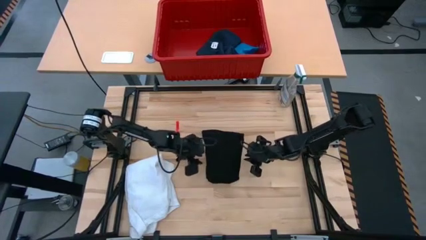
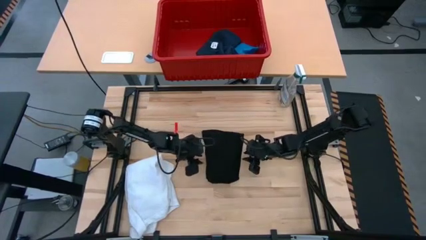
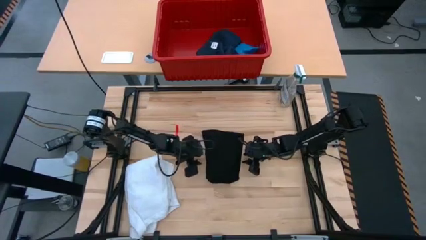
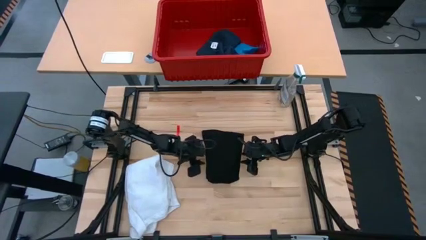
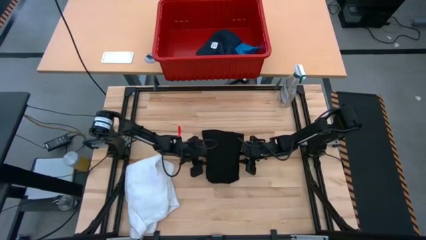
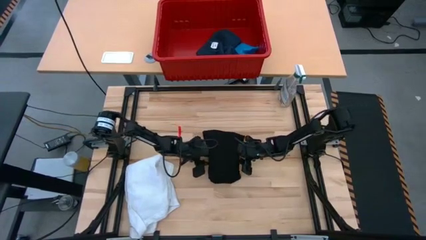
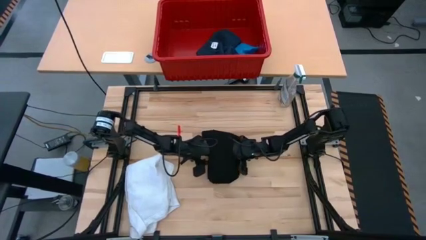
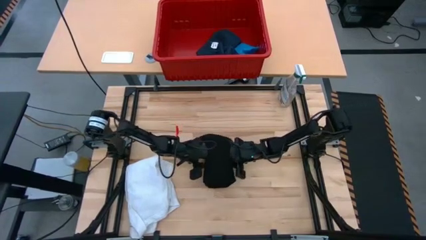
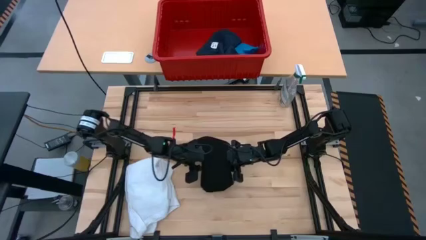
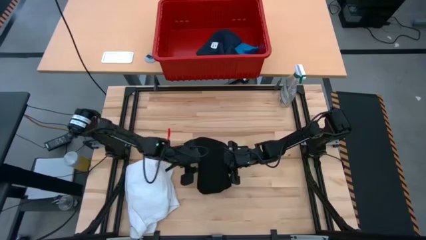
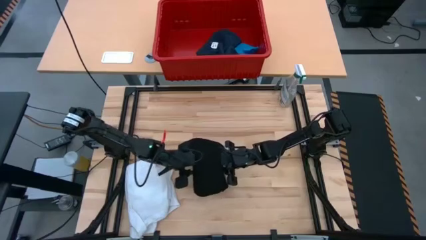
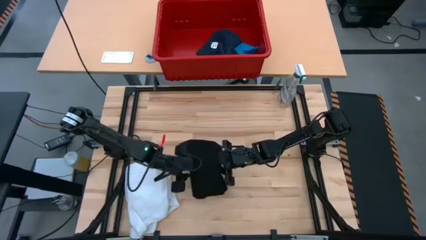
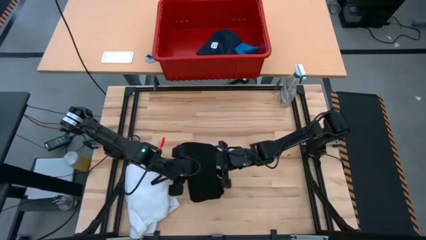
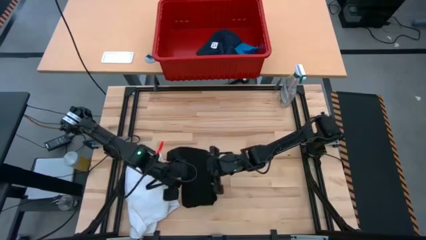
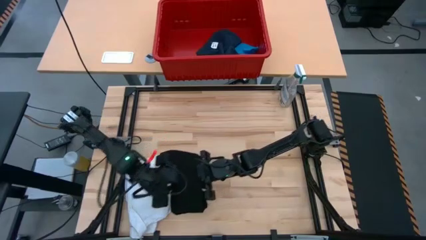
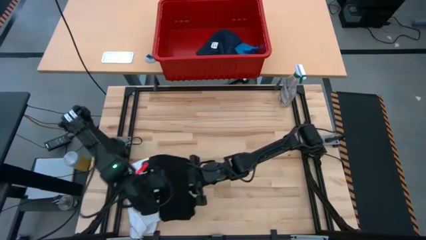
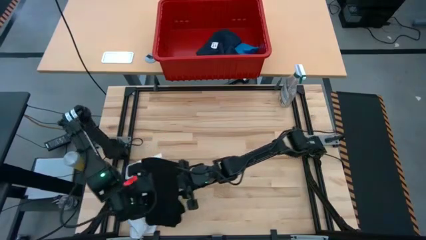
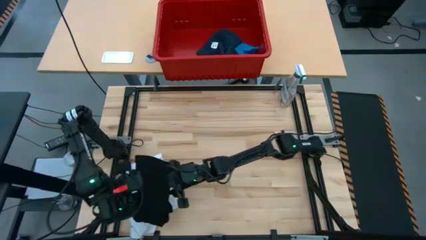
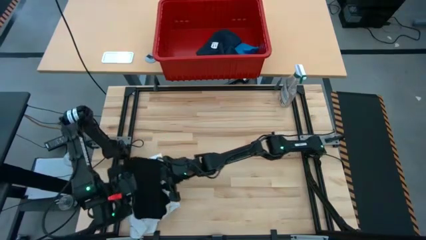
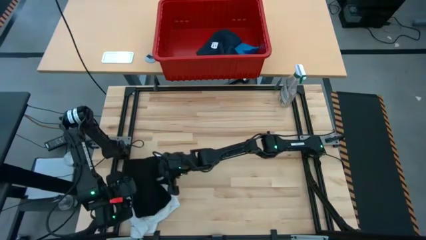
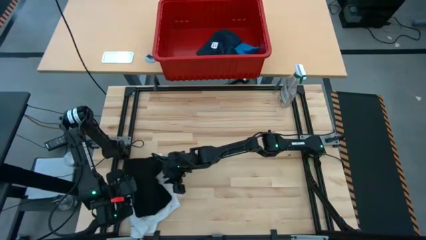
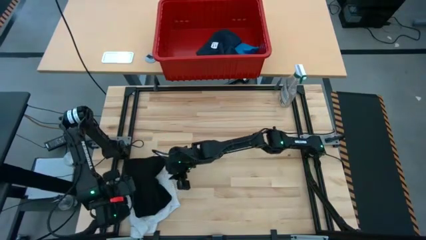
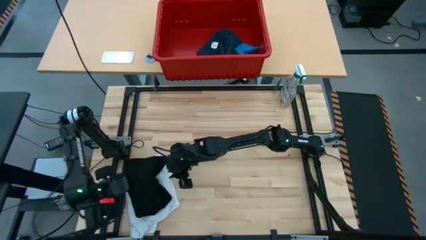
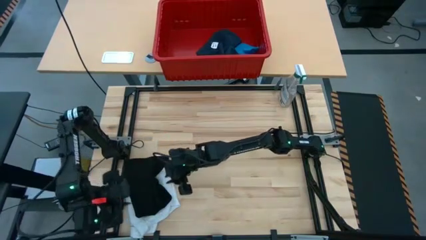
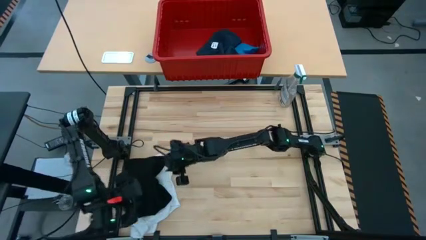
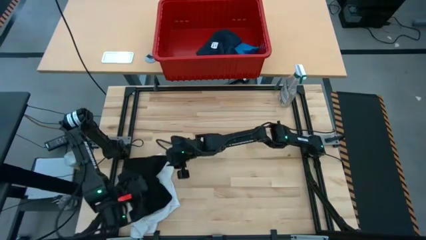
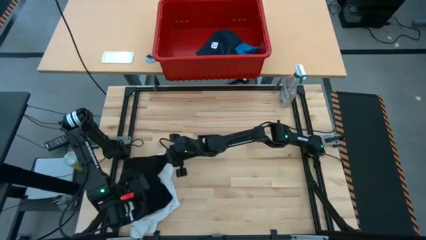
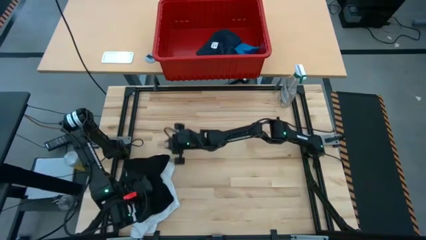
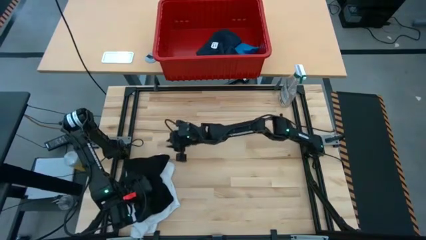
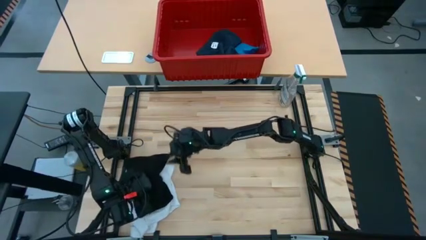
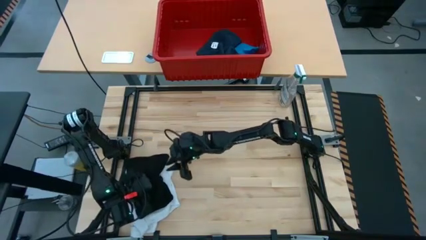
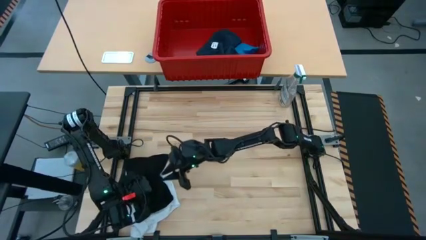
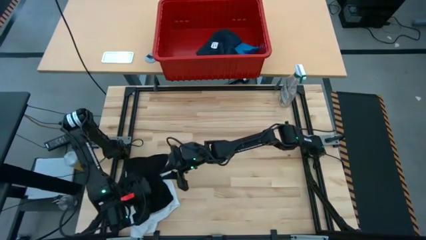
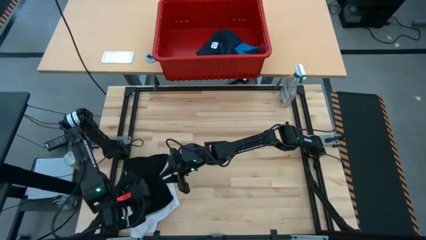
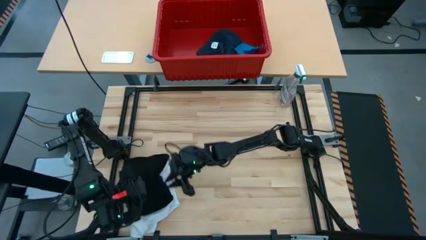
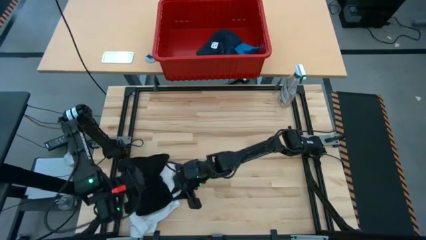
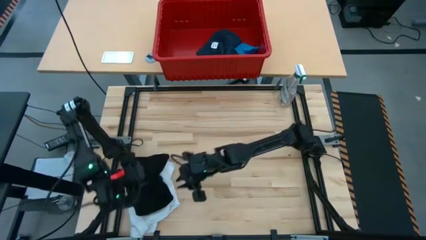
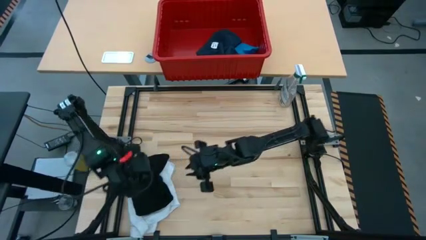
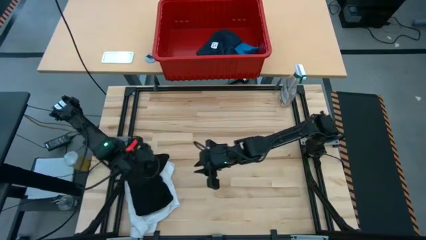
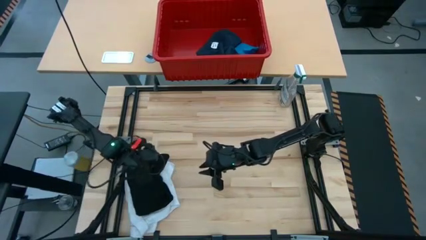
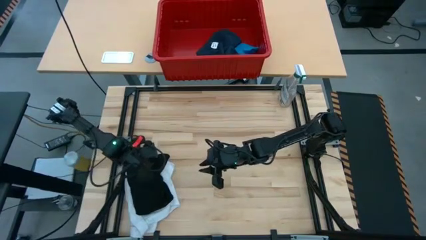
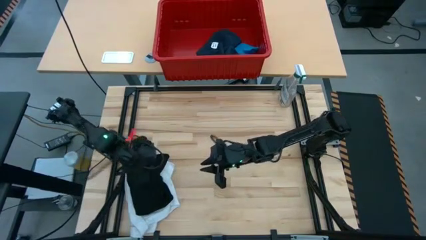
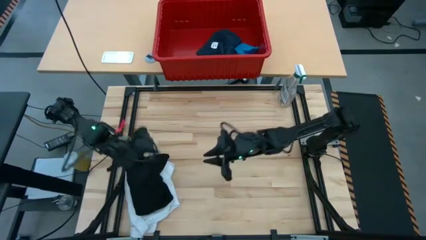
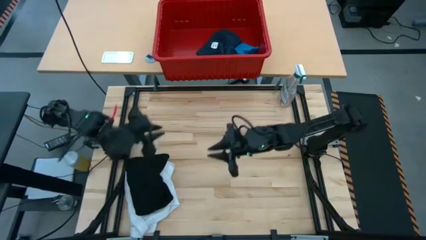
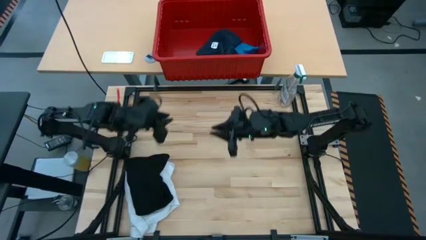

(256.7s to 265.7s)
Task: Fold Laundry from Bin
Stack the folded black shirt on top of the folded white polo shirt

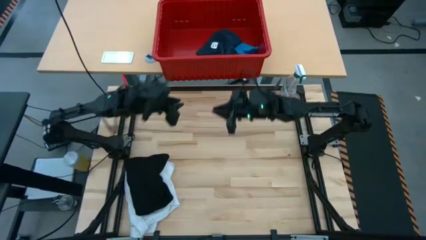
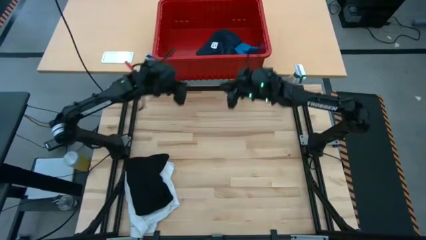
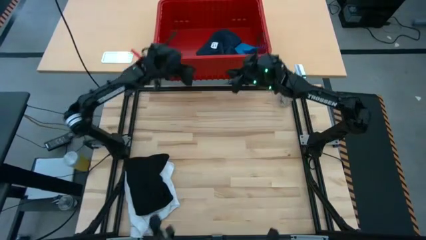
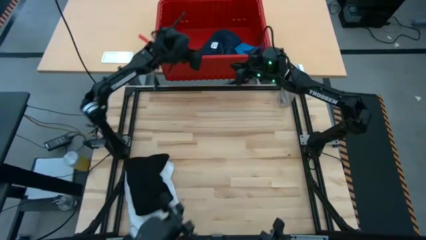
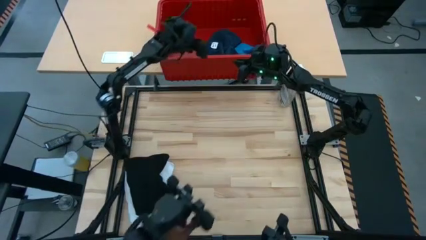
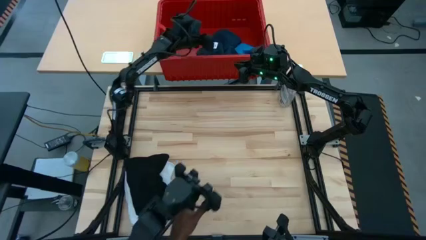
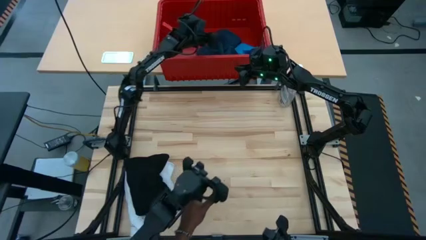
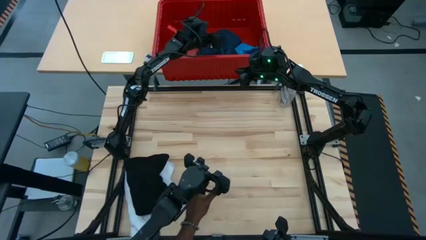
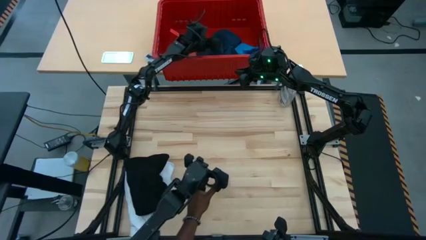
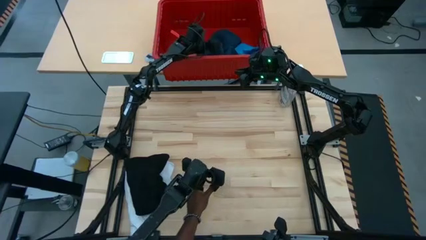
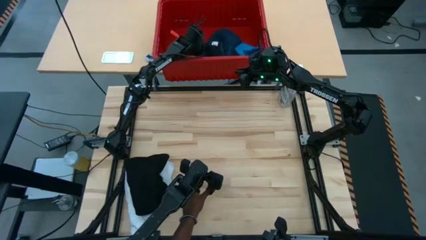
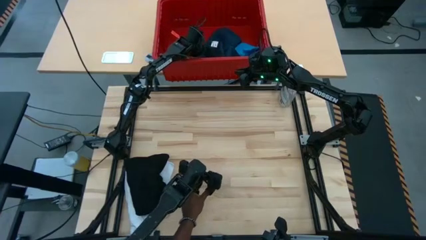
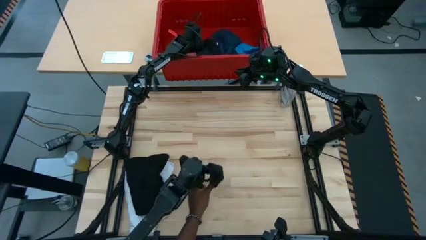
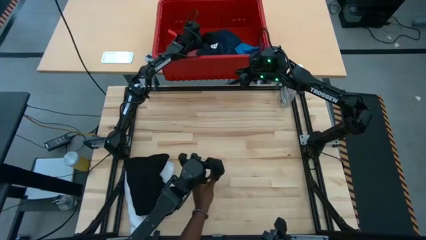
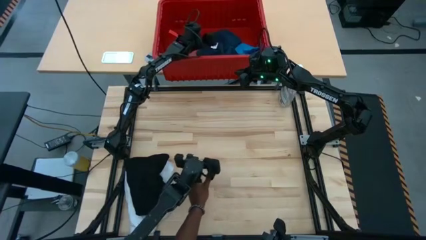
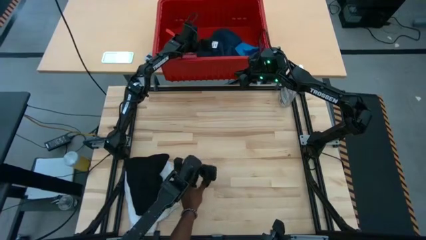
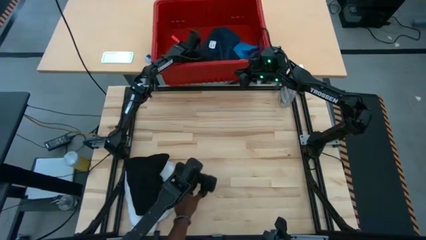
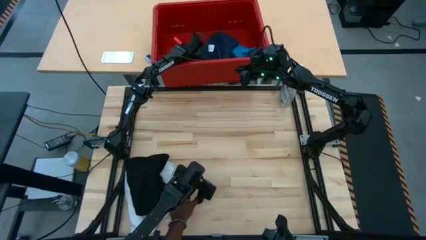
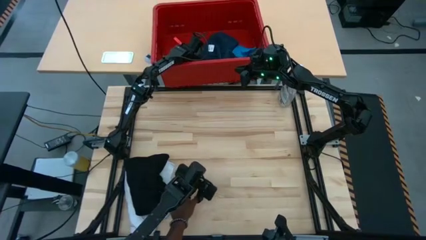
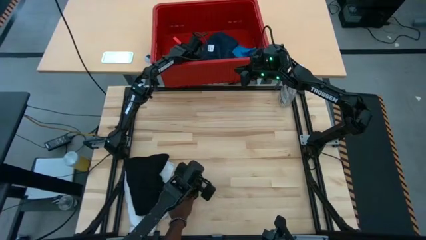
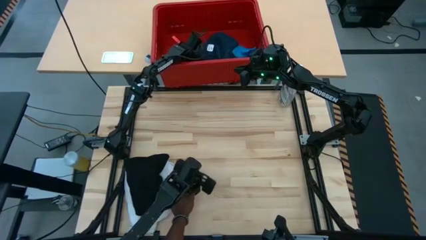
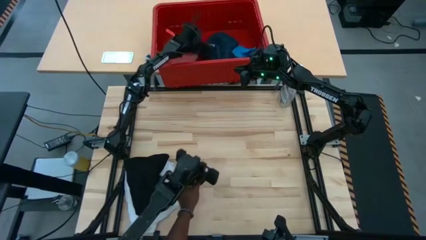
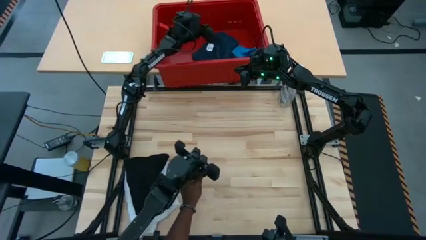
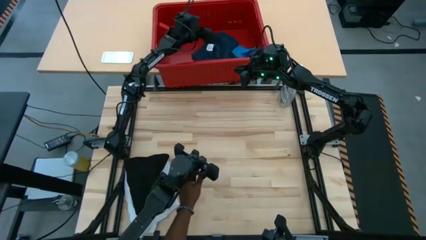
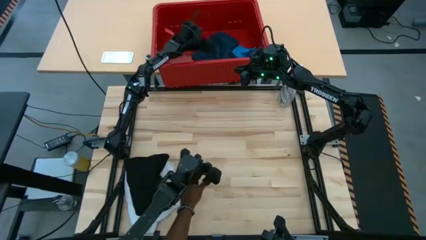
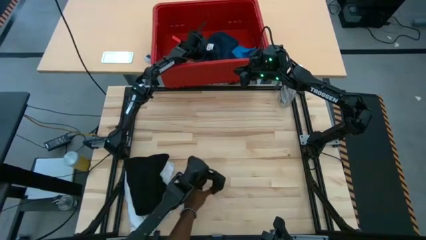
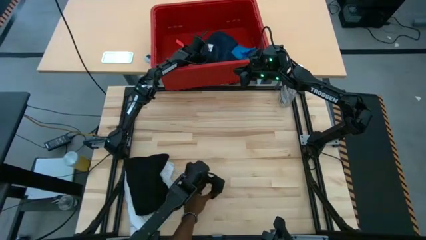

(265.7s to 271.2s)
Remove the dark blue shorts from the red bin and place them on the table

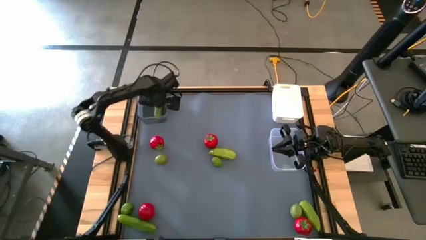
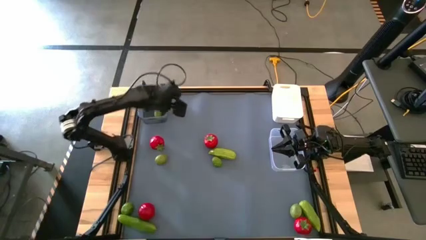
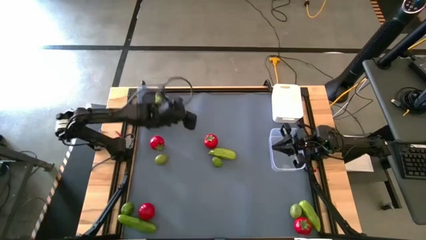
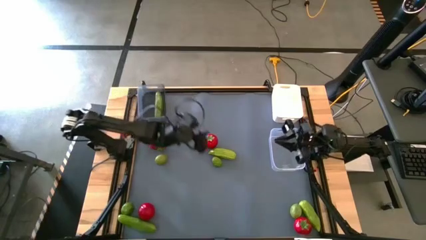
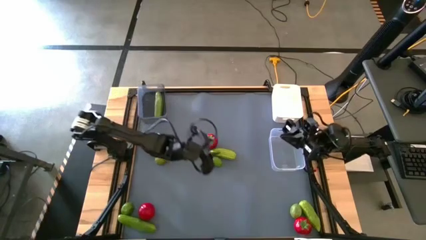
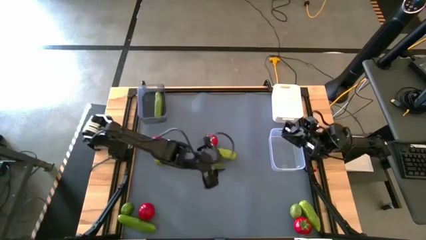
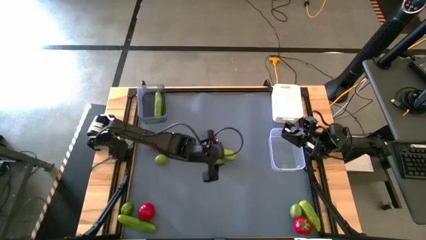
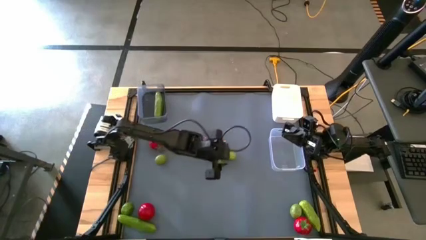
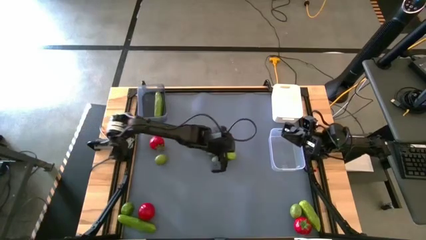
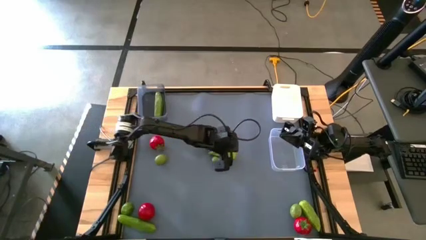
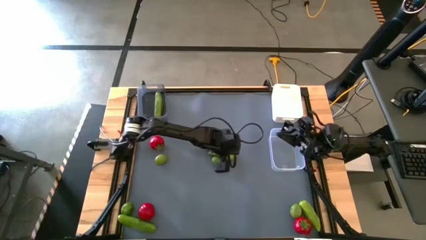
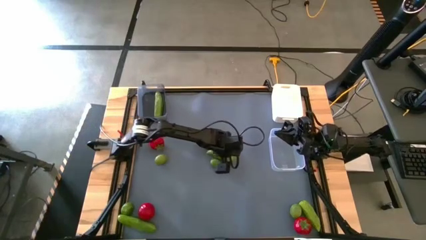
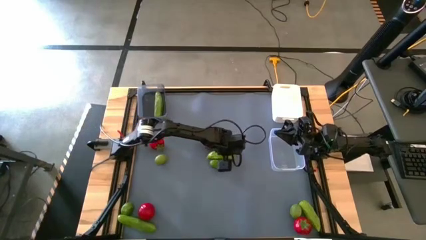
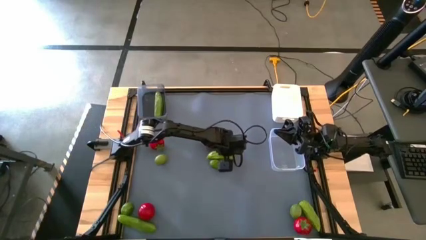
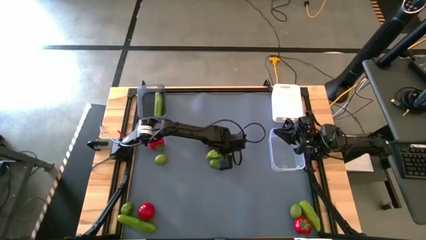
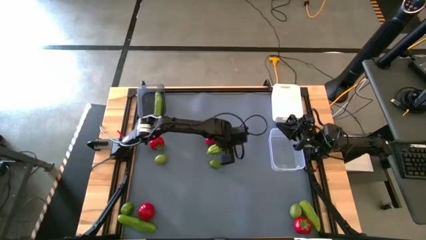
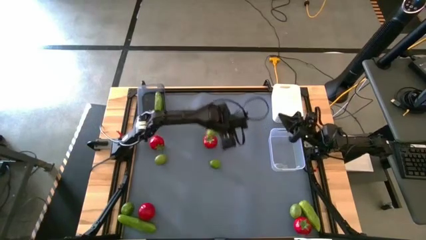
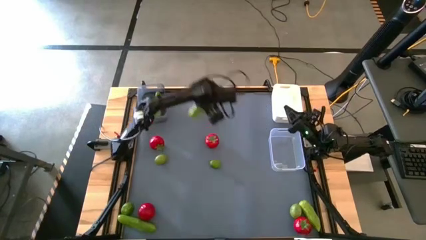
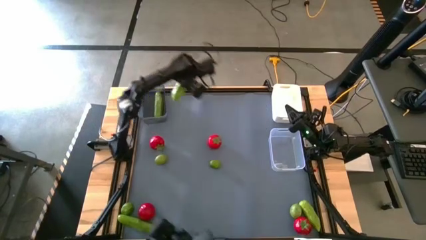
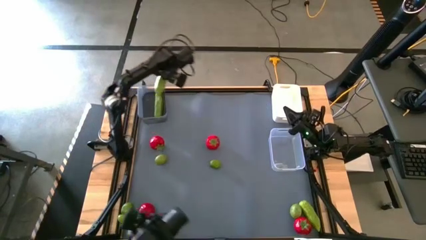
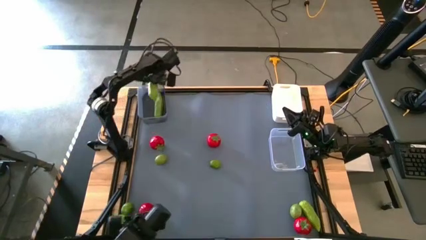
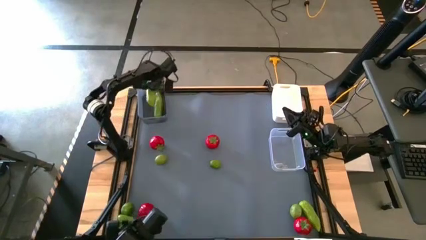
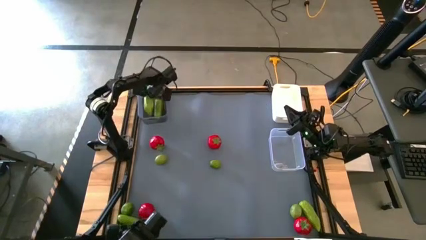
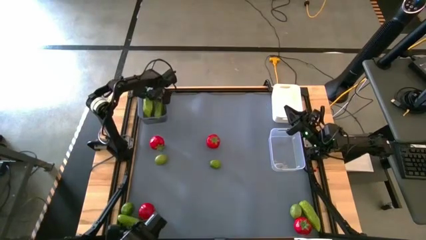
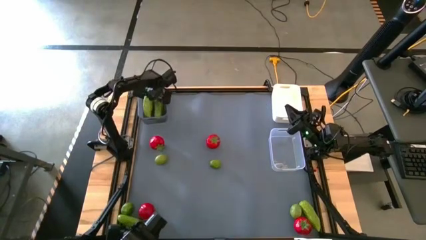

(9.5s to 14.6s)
Task: Sort produce into baskets
Put the cucumber into the black bin
